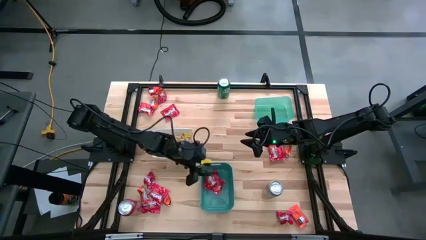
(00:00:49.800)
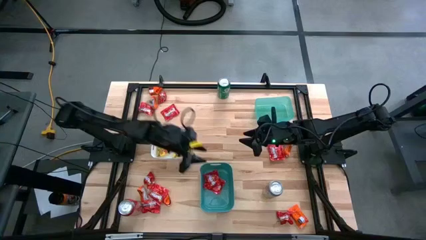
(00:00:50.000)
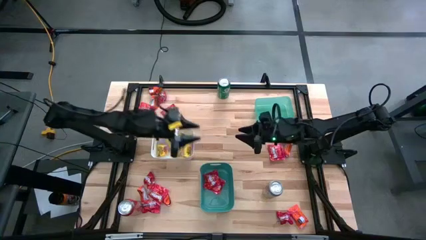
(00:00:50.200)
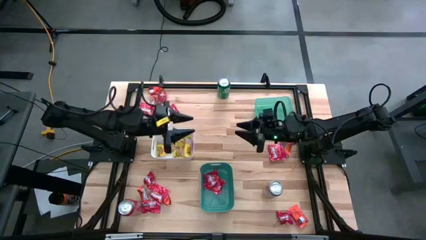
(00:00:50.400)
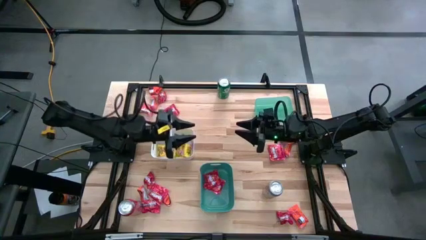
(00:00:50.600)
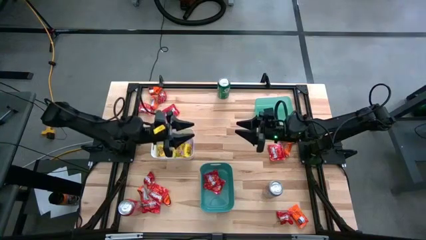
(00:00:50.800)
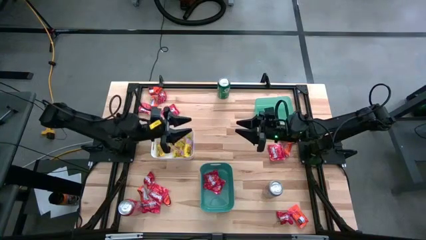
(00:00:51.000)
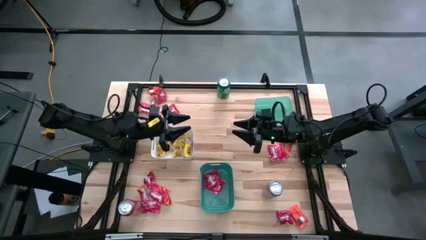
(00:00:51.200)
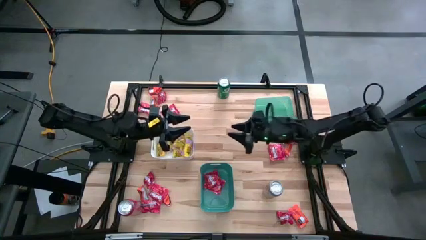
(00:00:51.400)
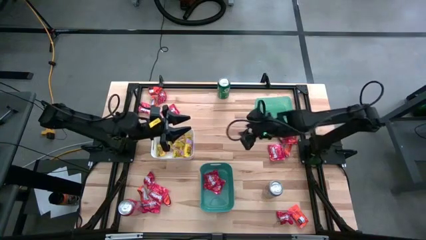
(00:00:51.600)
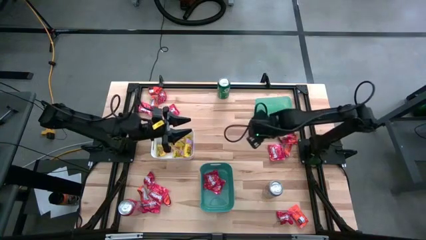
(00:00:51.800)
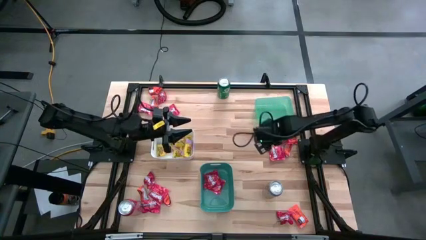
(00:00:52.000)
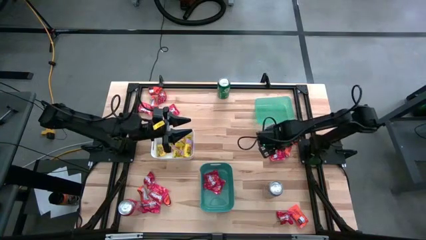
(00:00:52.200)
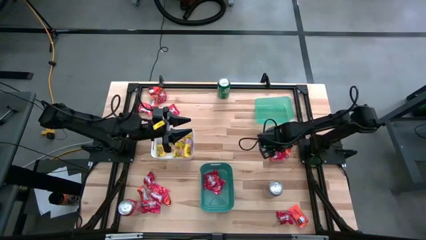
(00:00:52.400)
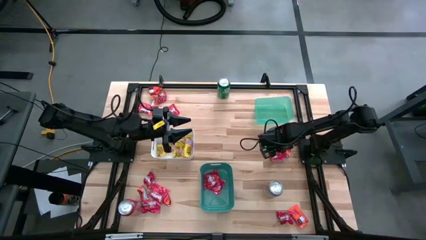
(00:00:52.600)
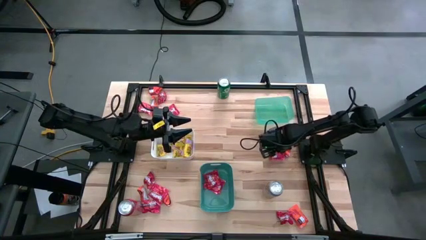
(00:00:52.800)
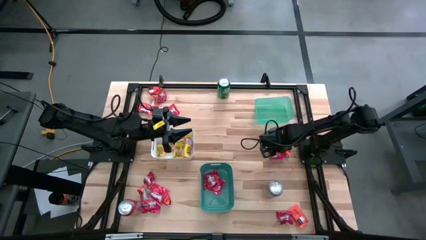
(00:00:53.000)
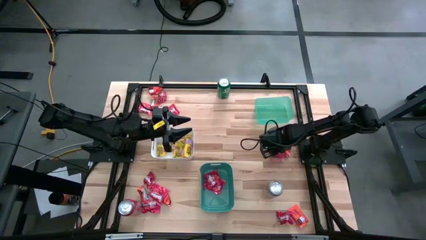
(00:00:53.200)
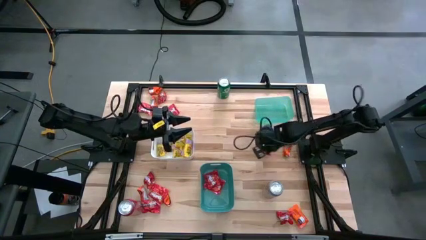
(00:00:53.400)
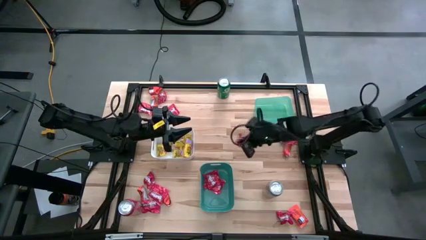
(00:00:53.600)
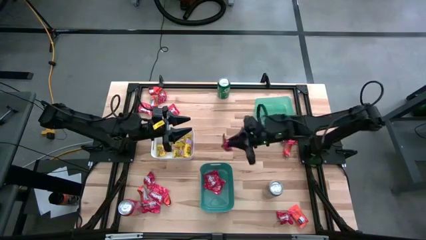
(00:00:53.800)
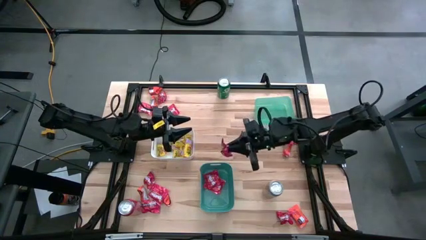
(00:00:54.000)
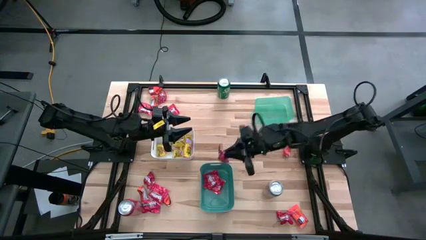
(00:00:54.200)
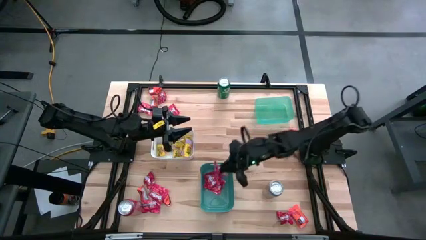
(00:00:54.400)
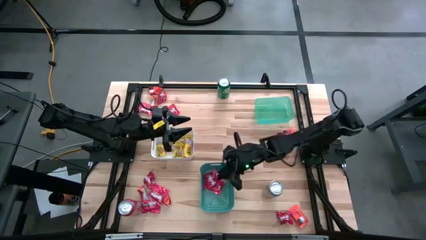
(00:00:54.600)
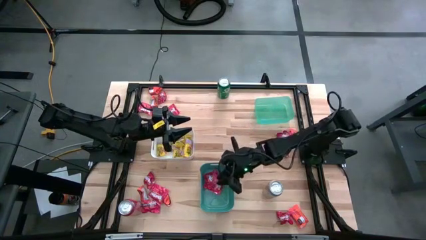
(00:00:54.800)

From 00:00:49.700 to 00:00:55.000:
Task: Sort candy
Put the red candy pack into the green bin

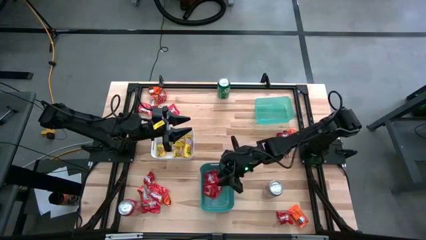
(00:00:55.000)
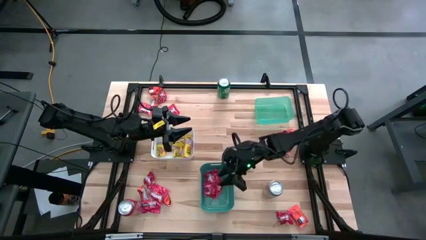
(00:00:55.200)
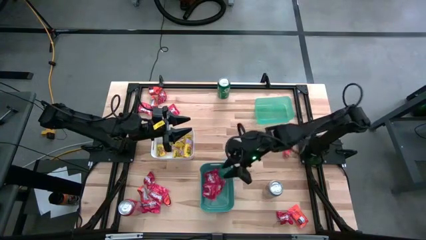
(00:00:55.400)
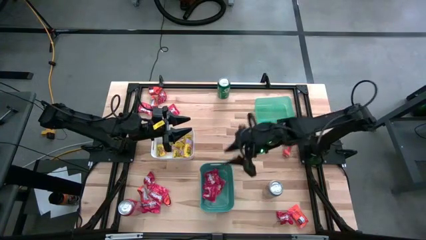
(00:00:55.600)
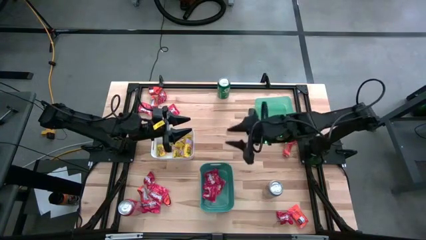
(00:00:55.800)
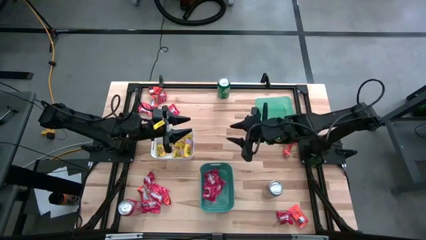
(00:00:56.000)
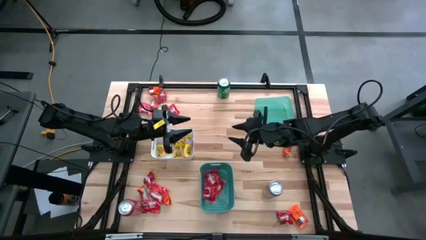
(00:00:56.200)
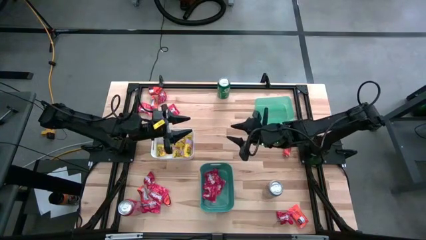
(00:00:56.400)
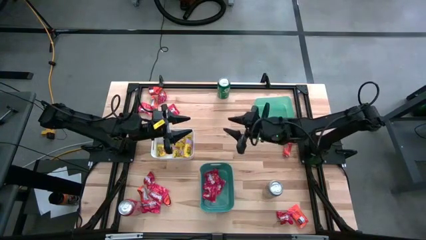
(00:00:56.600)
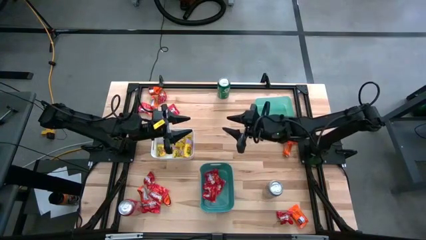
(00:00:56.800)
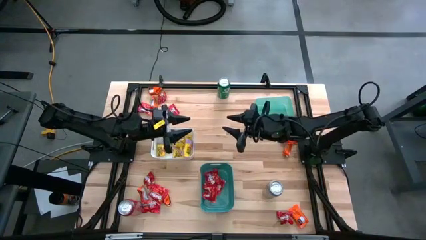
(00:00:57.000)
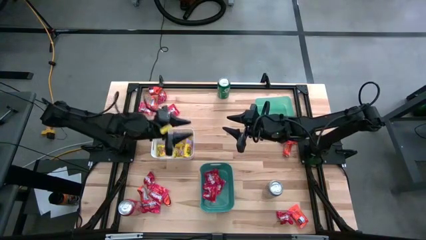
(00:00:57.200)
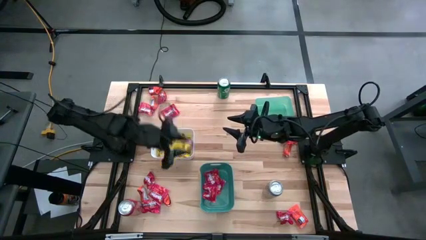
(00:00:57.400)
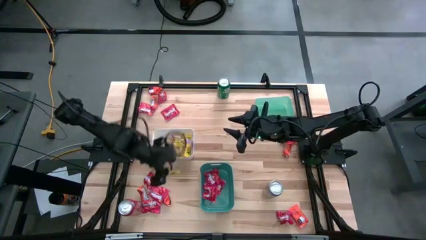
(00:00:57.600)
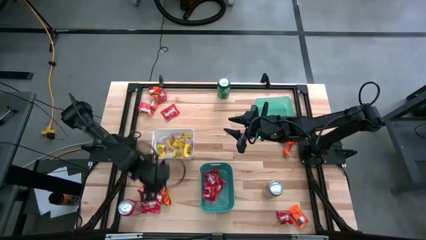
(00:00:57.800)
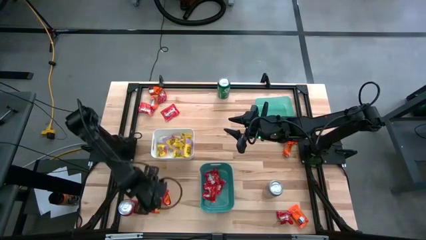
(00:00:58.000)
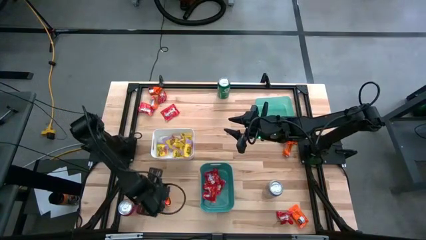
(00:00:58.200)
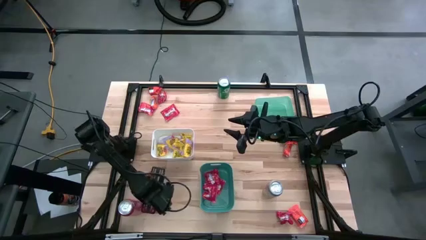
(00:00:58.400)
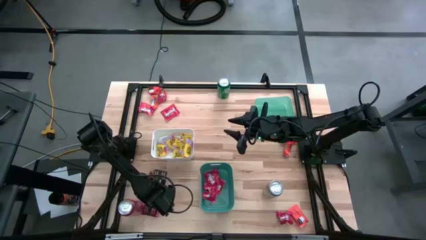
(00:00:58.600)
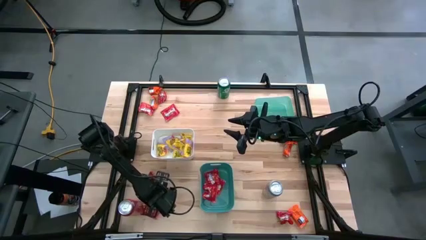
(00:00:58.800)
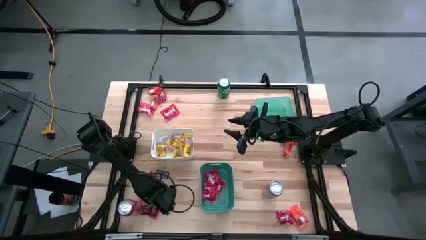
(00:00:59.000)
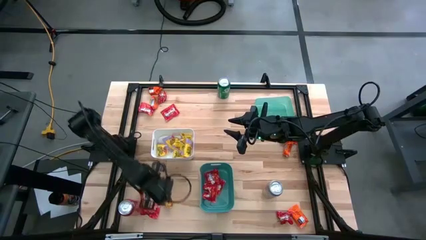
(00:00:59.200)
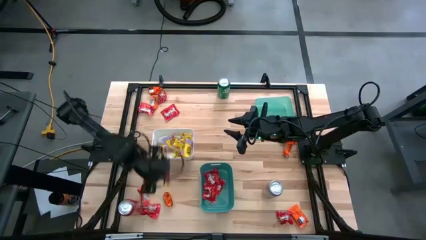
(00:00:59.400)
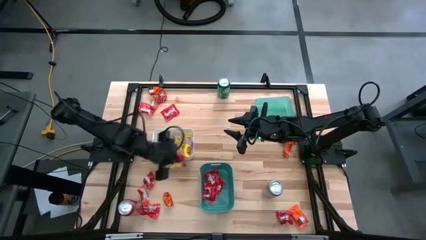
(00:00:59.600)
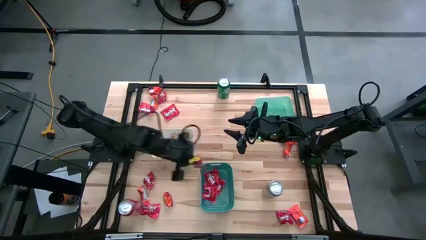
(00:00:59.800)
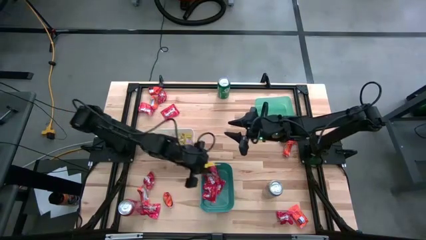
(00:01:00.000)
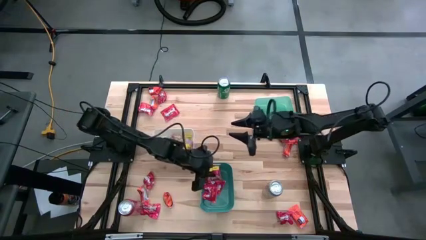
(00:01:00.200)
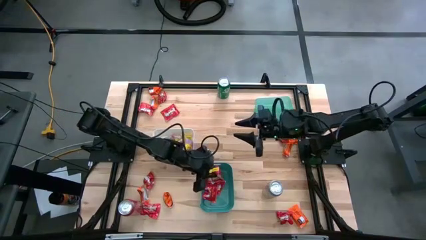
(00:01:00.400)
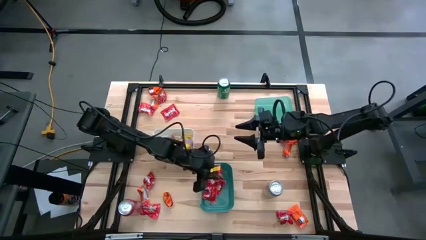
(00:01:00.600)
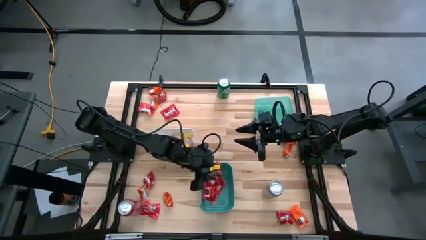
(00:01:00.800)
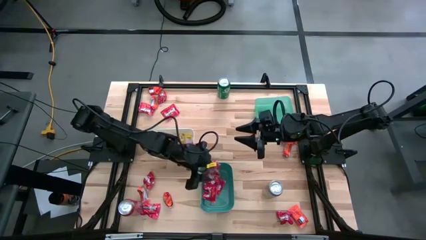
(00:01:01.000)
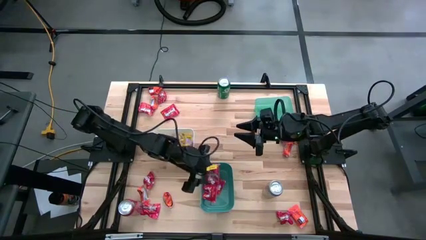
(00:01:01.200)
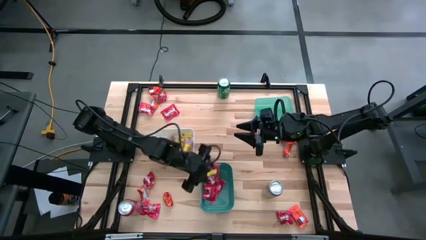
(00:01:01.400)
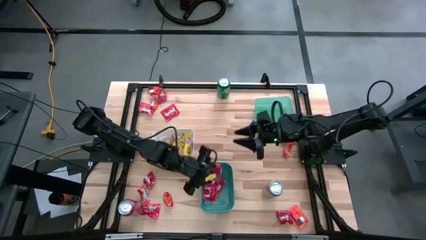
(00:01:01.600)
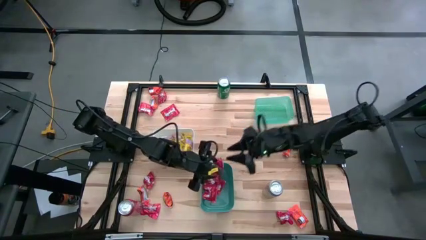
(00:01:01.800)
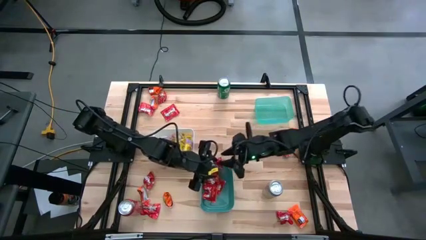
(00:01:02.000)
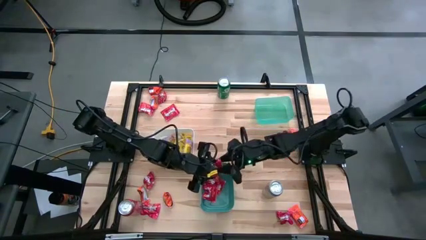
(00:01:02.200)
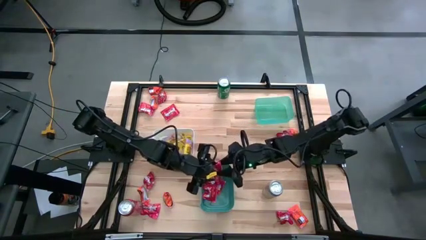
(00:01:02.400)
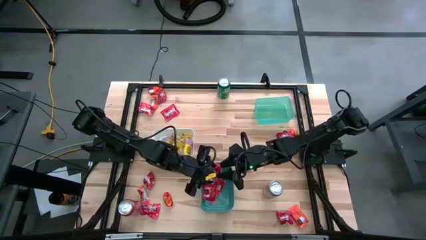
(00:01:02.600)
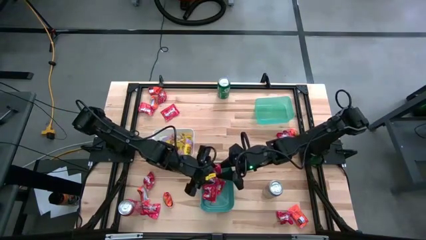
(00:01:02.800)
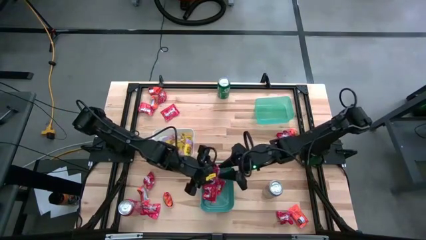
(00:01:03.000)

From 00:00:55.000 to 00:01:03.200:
Put the red candy pack into the green bin

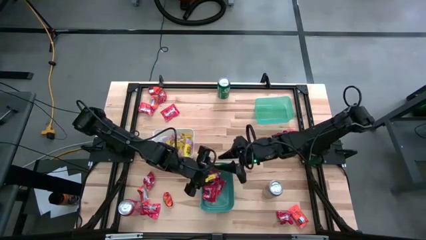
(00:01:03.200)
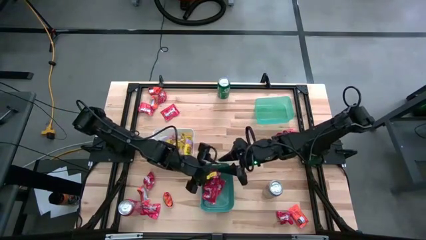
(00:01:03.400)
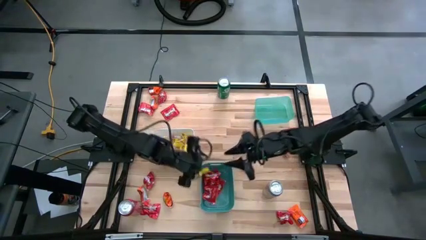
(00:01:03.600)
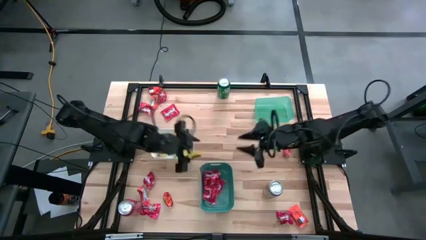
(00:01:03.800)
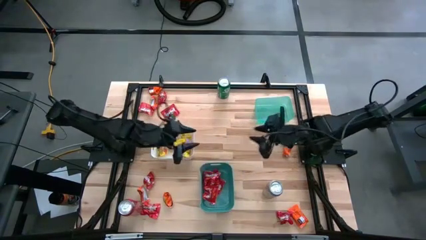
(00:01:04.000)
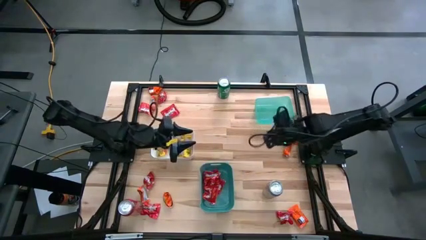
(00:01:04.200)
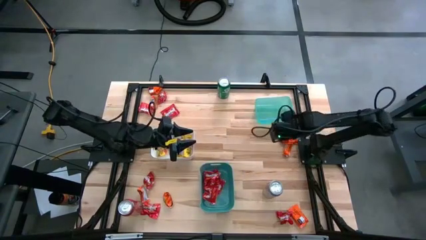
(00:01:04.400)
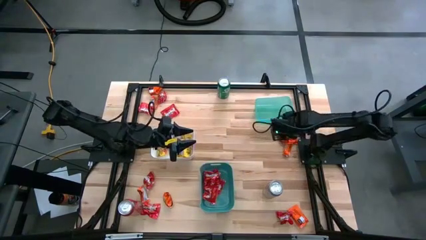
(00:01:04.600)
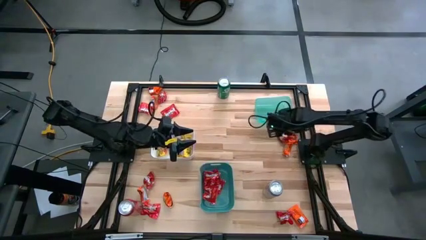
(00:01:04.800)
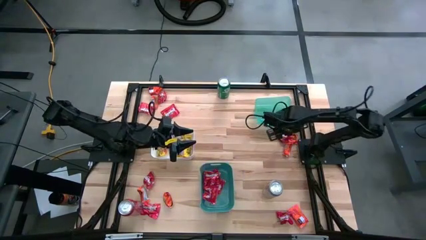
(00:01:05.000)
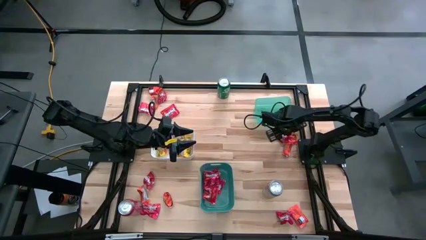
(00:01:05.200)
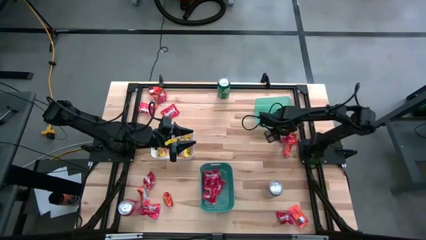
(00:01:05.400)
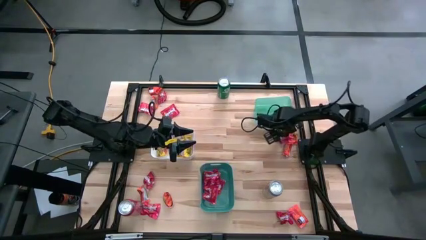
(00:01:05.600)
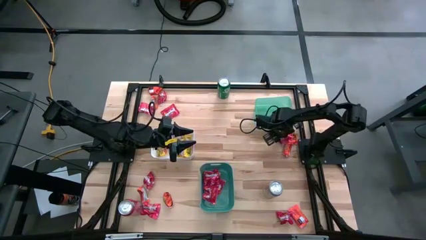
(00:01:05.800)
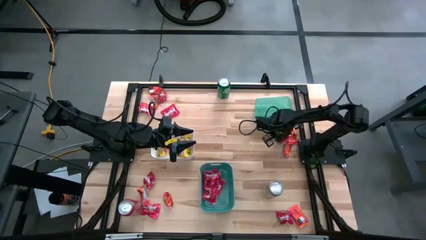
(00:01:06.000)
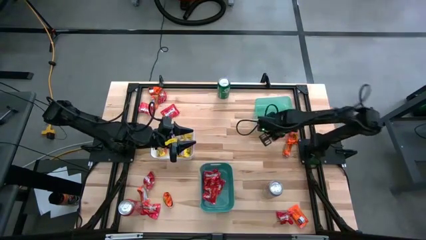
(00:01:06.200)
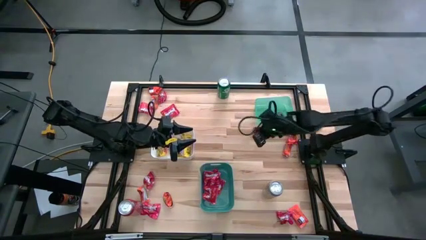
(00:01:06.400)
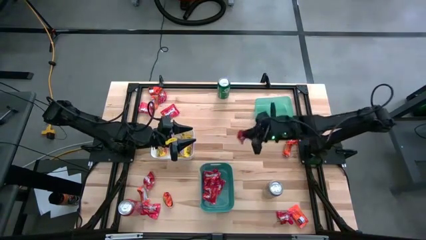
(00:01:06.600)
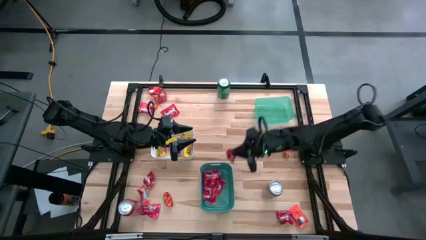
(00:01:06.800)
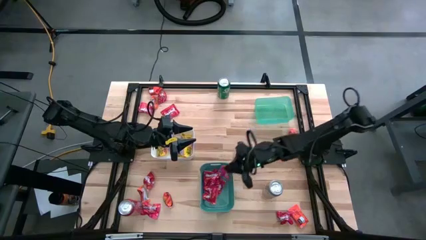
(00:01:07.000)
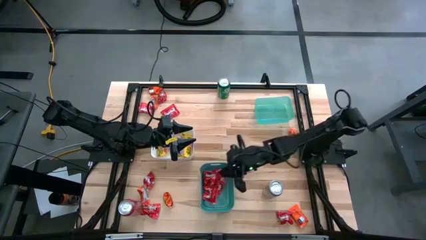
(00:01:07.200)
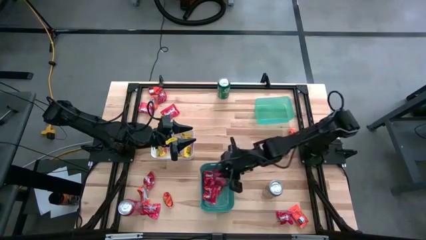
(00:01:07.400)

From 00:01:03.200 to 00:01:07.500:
Put the red candy pack into the green bin
